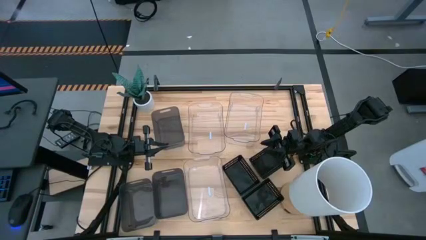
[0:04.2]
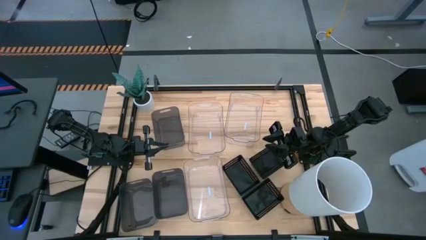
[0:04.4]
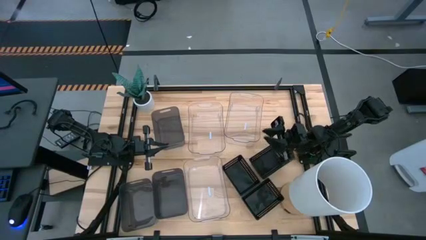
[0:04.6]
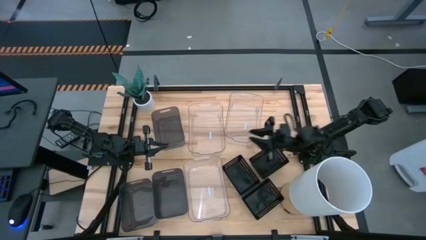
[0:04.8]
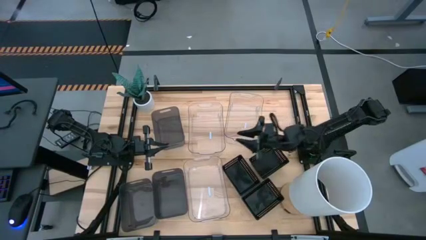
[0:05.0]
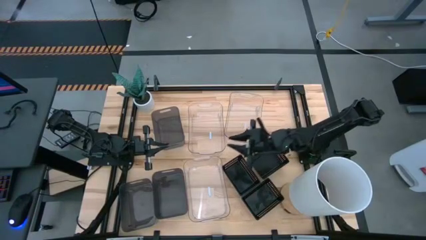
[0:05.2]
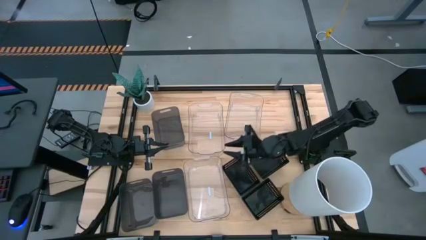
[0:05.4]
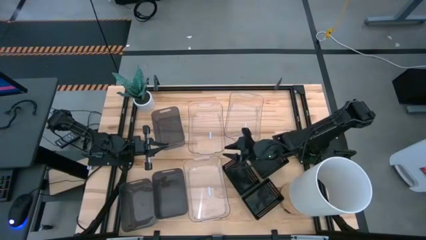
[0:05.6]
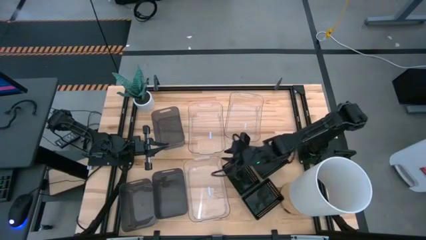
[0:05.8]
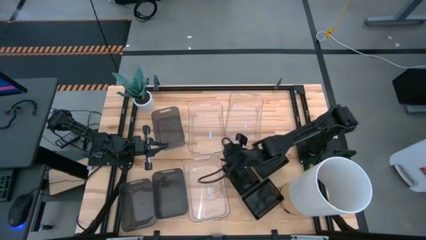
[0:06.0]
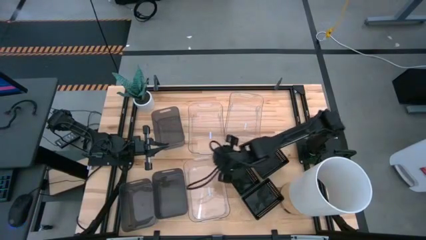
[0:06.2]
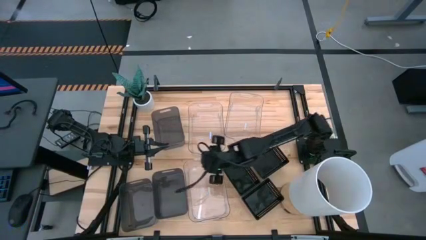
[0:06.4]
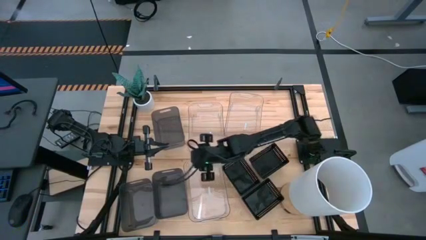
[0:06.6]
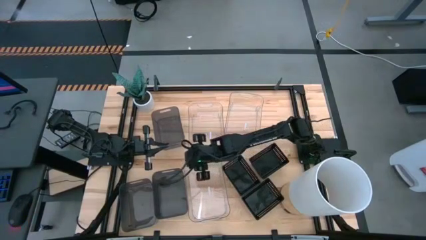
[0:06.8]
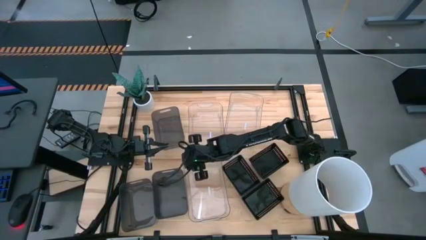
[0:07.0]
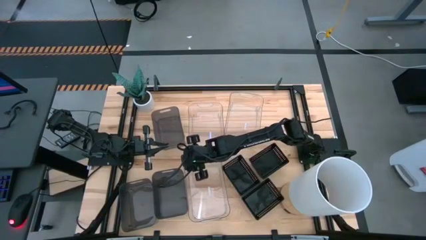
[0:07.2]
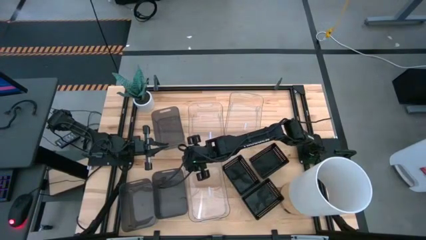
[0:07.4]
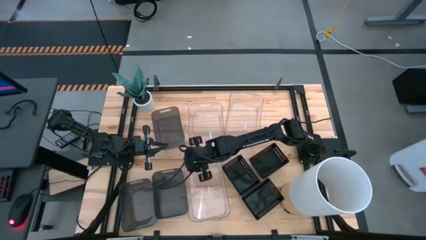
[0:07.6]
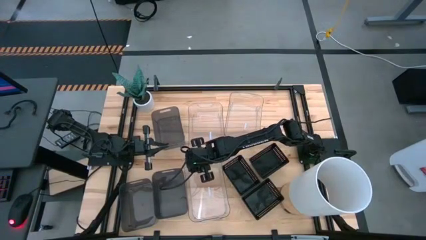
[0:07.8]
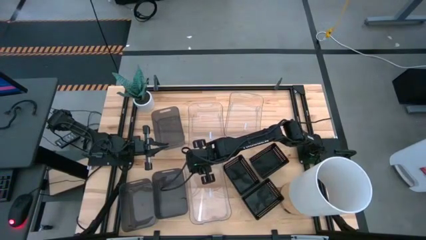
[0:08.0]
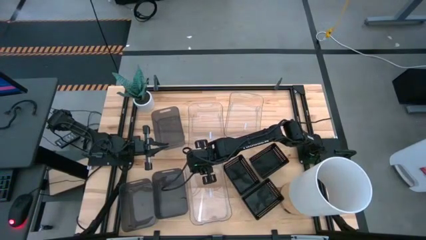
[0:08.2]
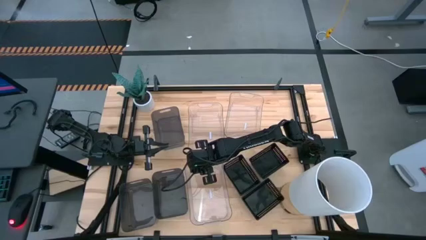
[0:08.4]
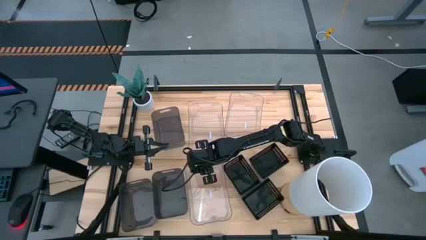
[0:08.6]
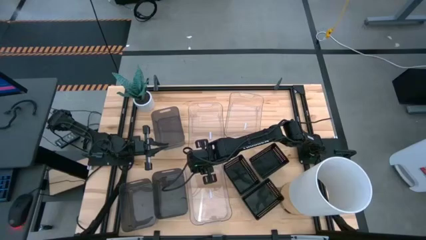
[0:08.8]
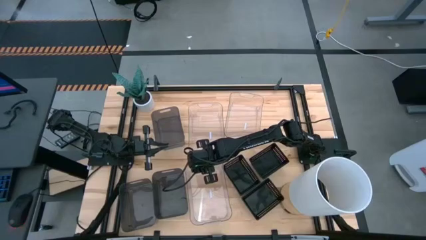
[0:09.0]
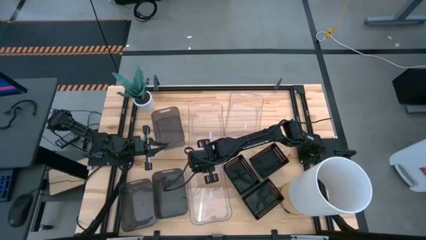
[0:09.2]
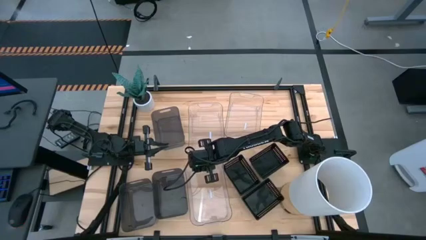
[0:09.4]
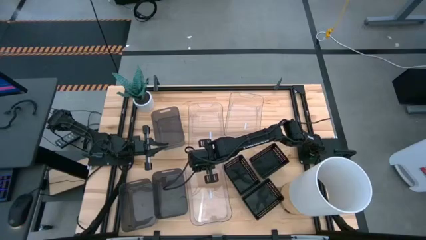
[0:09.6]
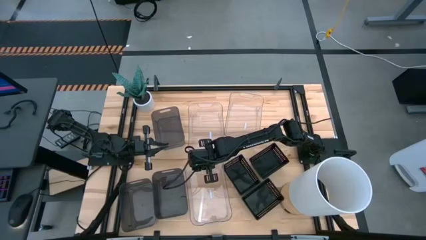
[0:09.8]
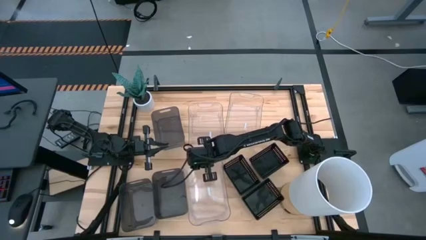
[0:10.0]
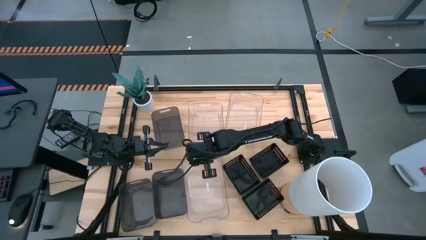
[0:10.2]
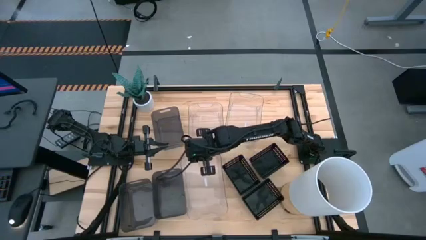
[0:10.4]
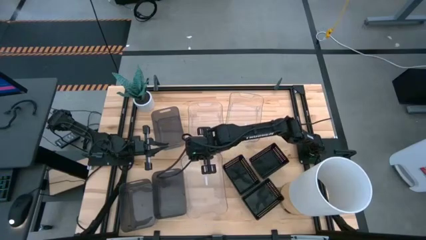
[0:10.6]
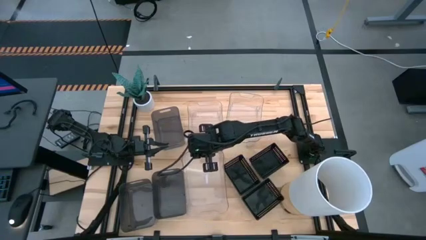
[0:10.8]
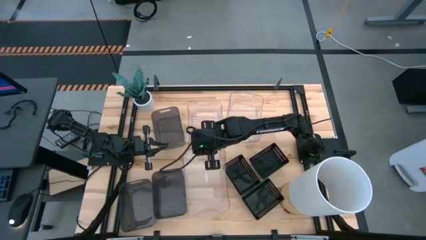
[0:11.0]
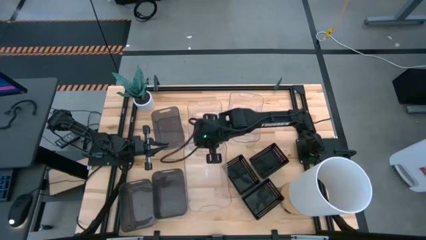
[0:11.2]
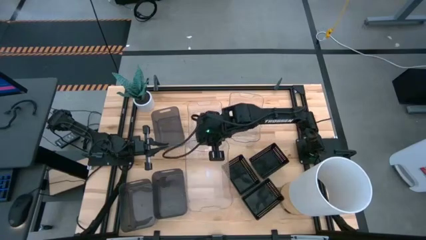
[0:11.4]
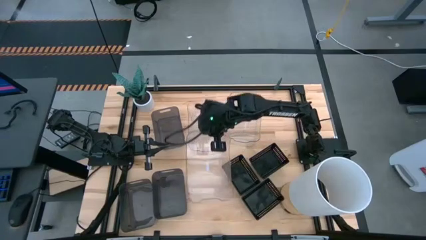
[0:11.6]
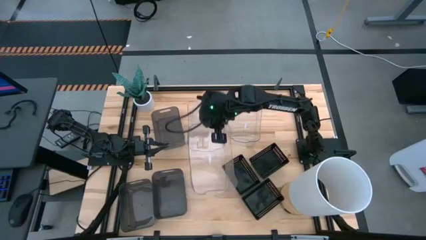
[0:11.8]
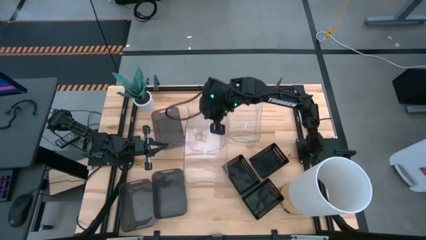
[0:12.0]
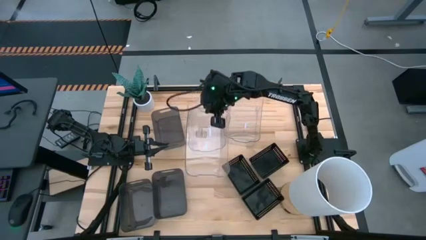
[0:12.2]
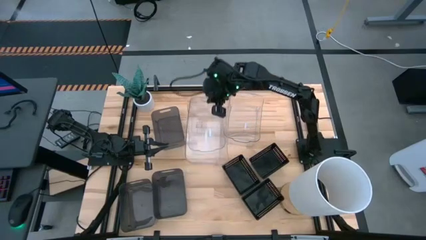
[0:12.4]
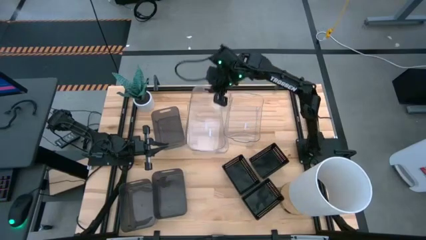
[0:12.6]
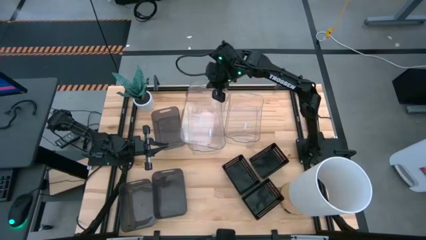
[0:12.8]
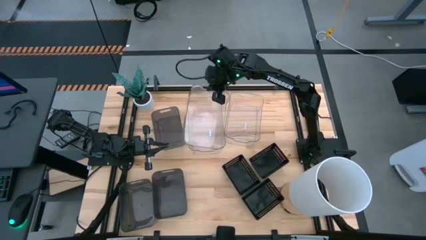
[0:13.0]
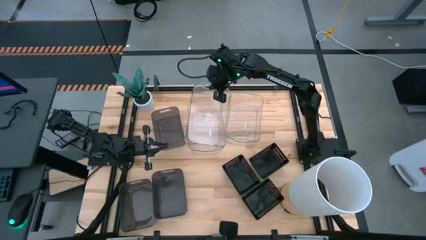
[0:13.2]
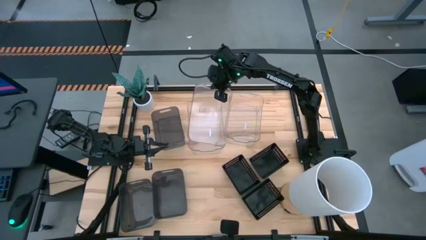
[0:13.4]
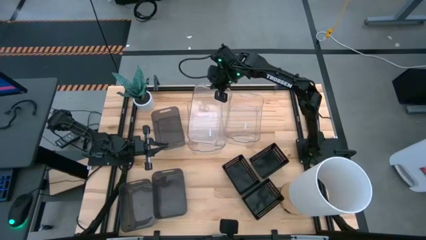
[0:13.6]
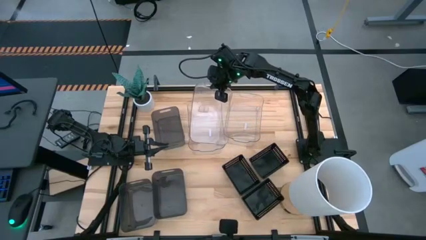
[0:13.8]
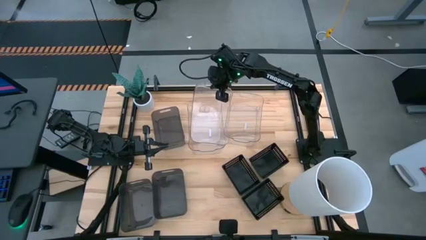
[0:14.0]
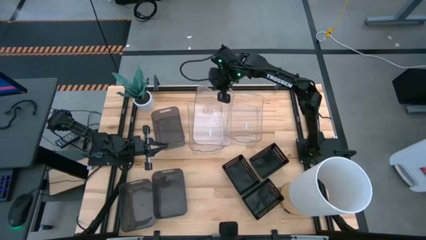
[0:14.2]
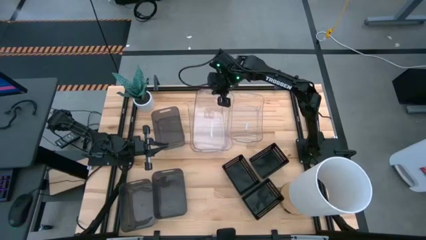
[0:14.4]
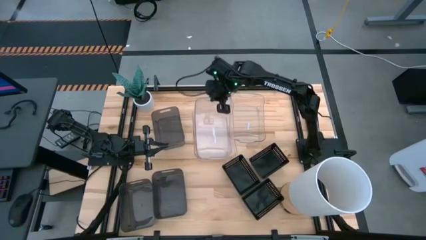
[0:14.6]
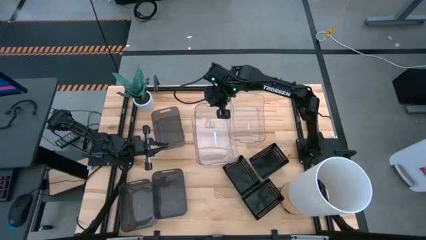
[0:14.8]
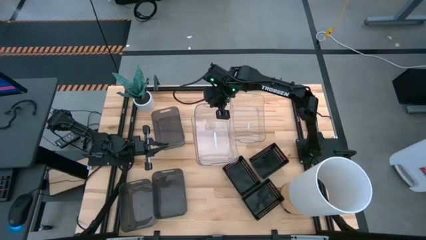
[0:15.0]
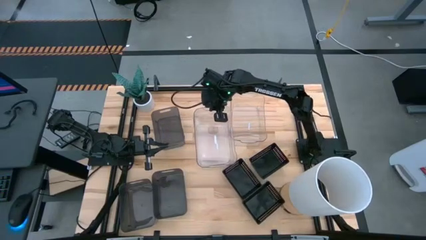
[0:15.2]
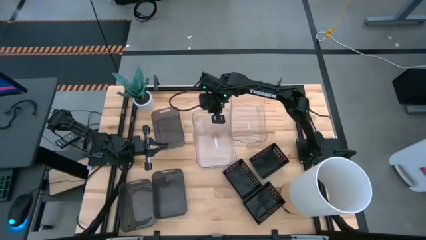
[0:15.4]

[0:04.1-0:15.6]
Stack the bottom transparent bin on the top left transparent bin

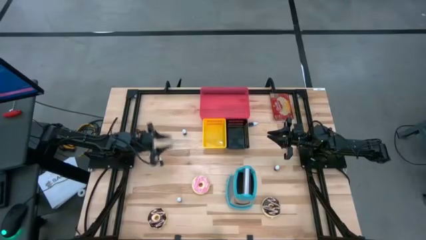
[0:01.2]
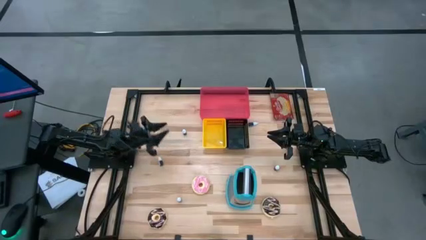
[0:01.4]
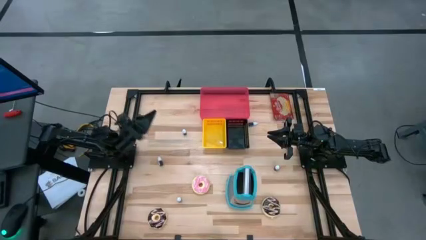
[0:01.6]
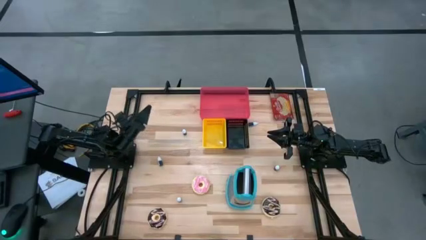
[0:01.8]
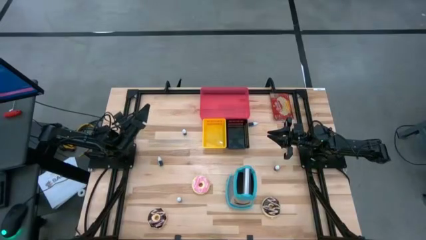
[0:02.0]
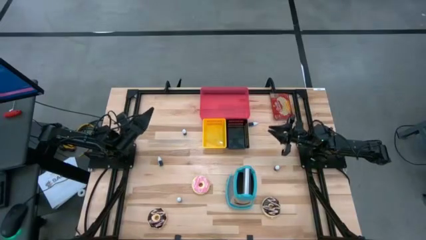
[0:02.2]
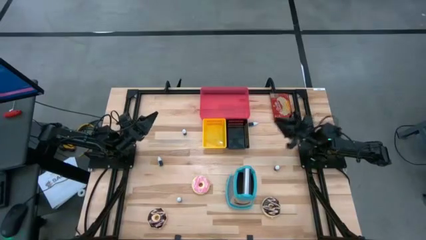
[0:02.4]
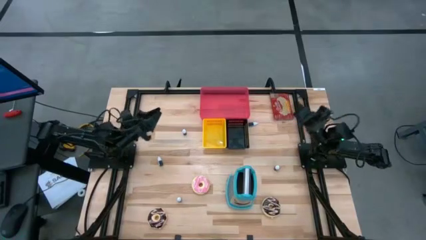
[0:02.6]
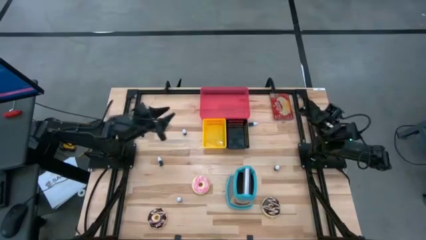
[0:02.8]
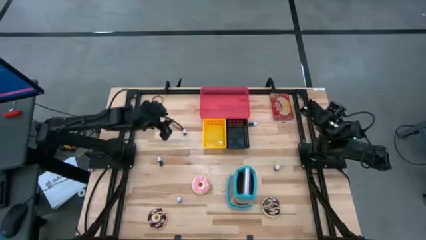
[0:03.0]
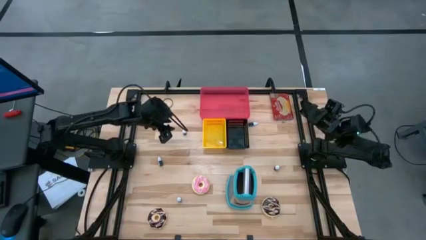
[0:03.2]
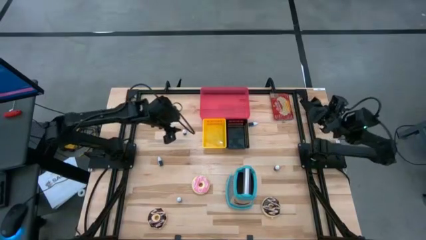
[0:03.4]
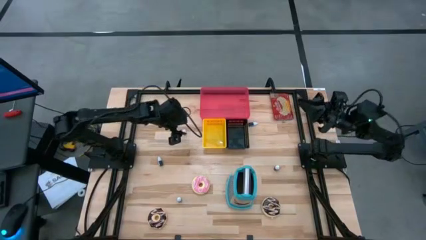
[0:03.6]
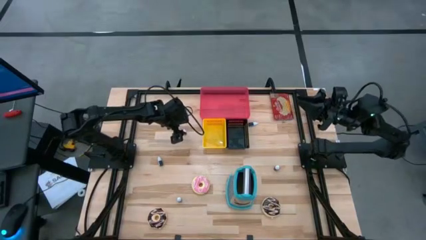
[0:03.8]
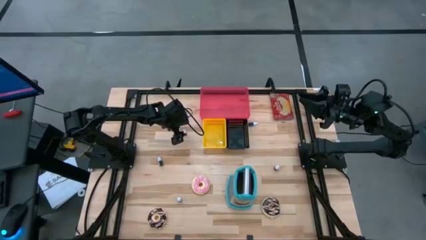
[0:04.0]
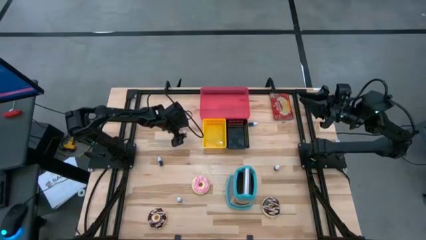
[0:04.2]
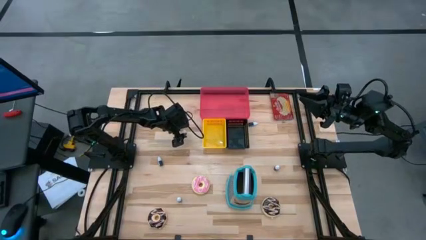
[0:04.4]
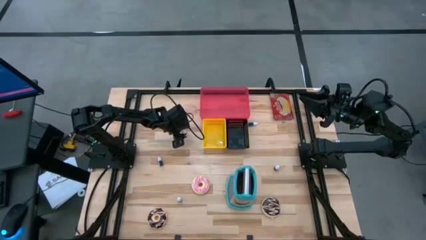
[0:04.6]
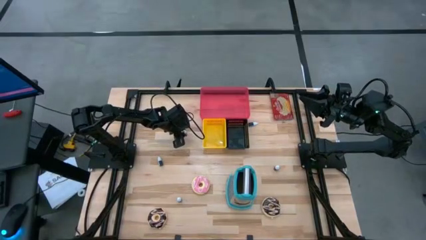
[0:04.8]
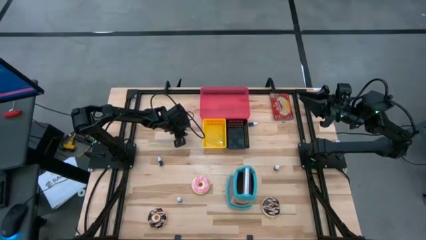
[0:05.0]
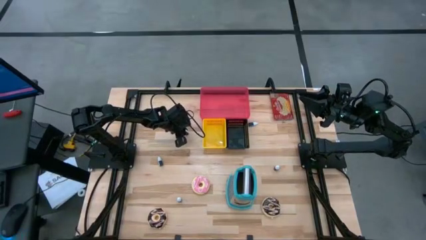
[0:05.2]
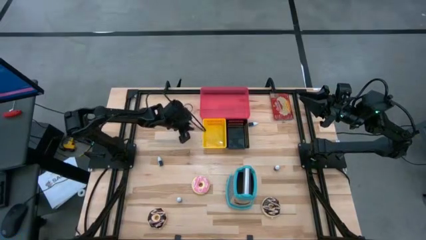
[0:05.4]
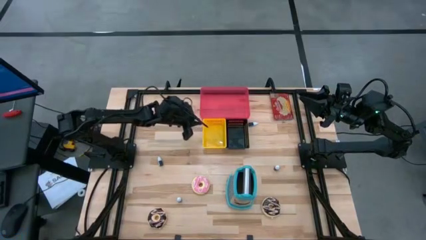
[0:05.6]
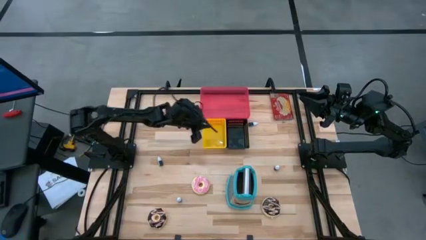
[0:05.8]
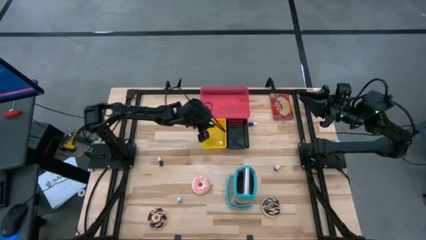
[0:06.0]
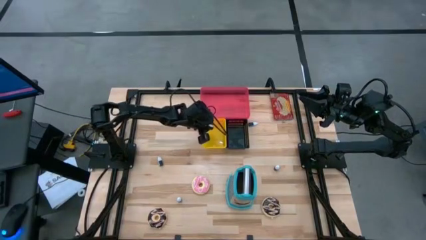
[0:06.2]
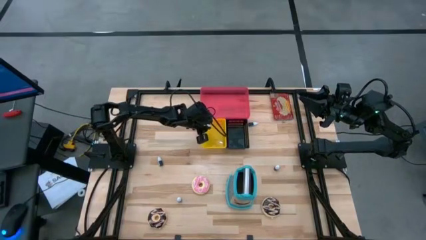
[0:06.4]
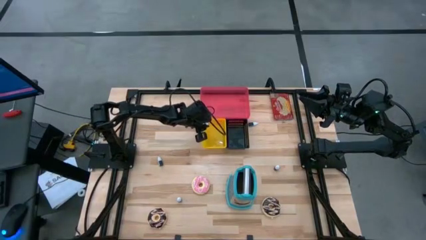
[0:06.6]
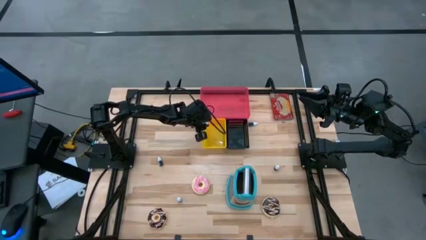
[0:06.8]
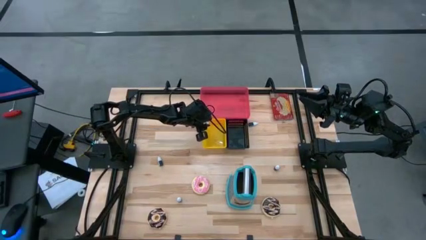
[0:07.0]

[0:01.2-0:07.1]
Put the black food coloring bottle into the yellow bin
